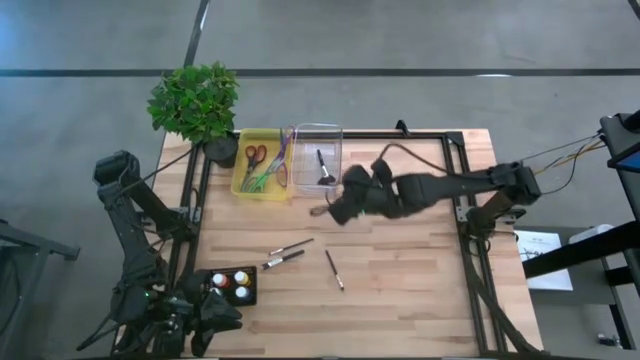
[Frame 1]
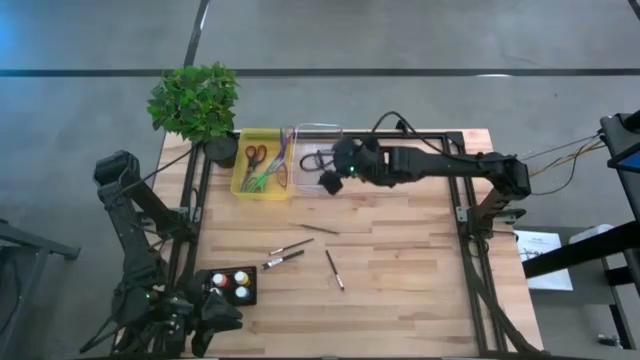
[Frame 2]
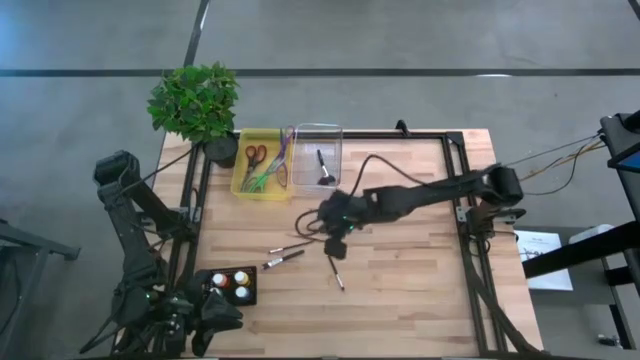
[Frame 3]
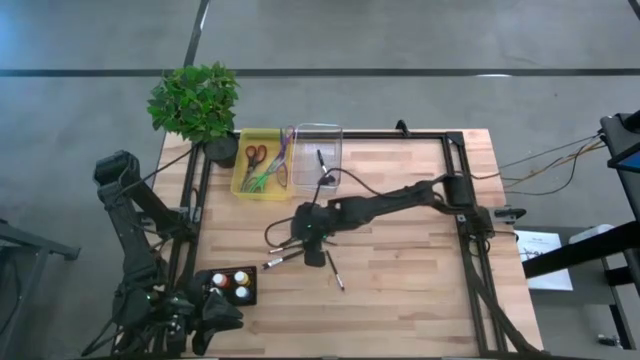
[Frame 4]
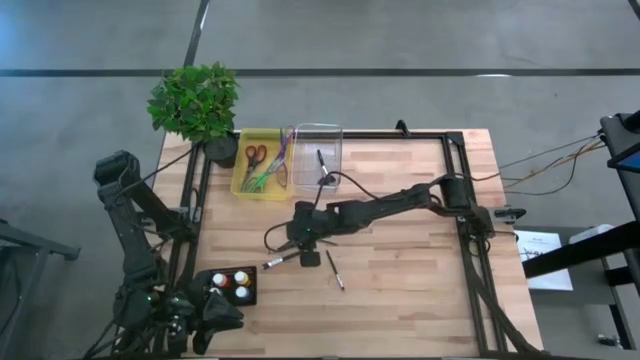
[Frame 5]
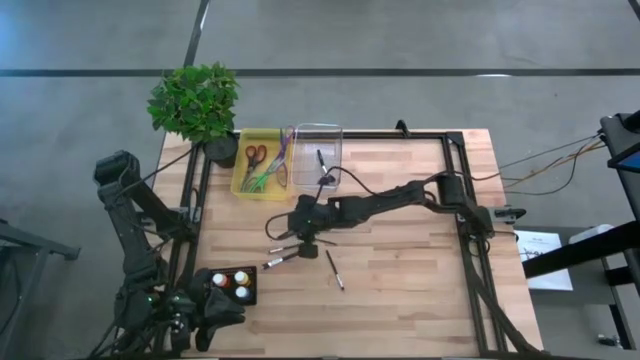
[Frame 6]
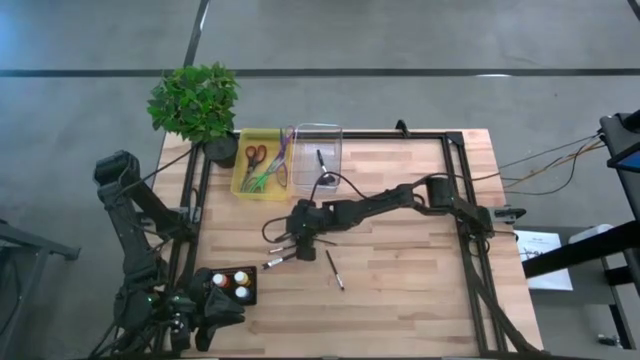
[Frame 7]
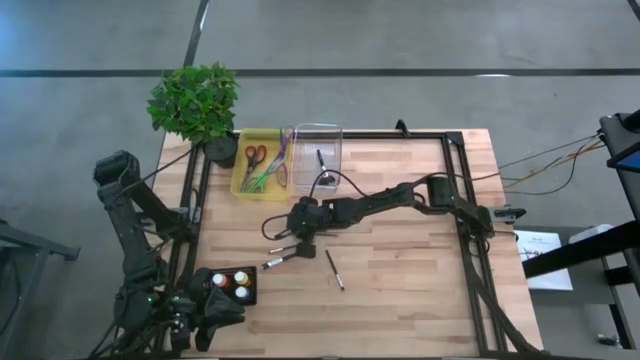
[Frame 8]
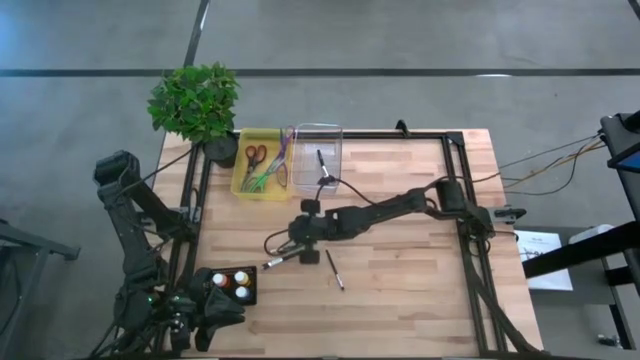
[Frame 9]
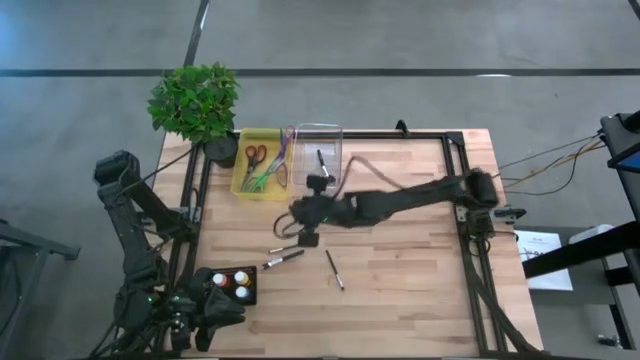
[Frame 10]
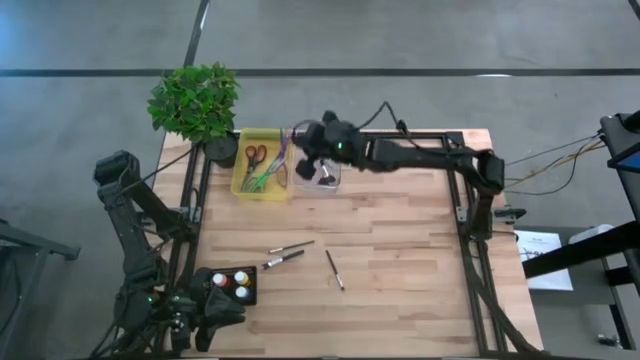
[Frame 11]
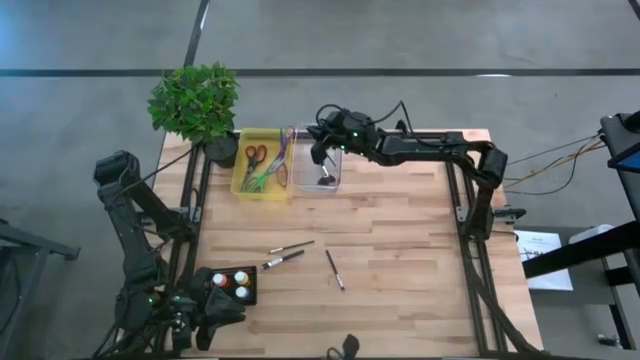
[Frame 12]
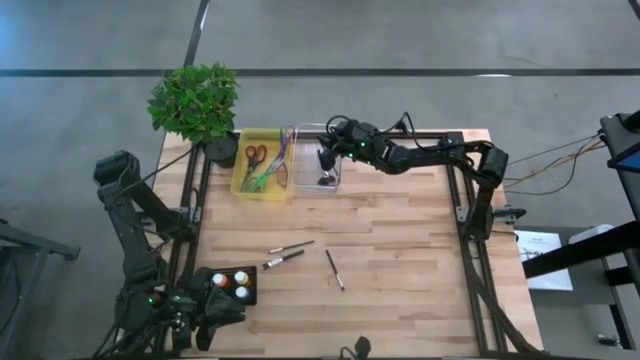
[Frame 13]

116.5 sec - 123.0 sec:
Task: Pick & Place Paint Supplies
Put the gold and black paintbrush into the transparent bin

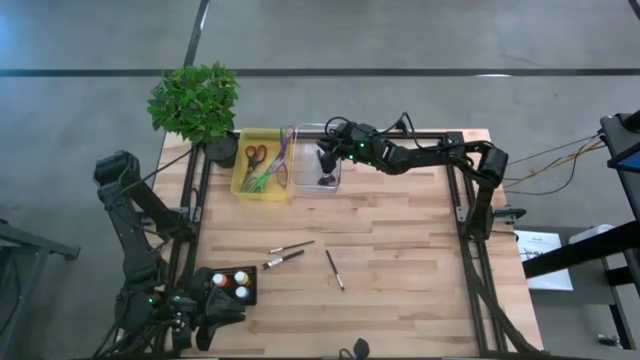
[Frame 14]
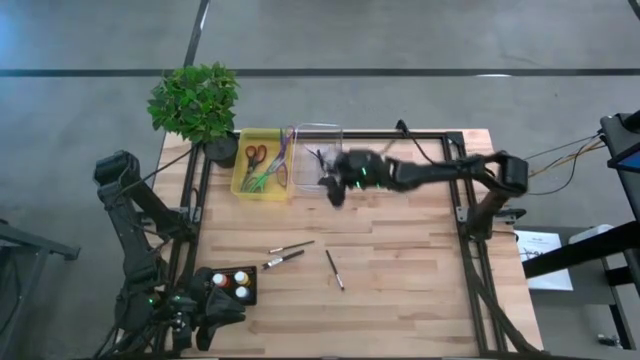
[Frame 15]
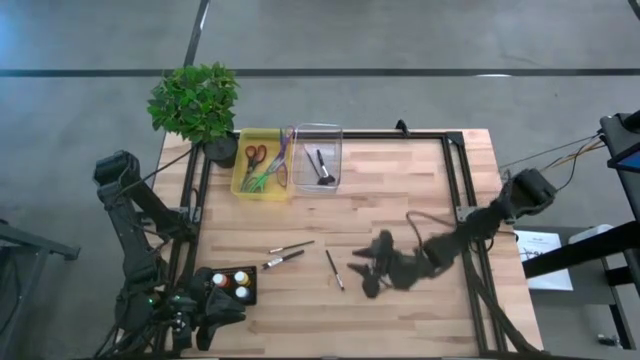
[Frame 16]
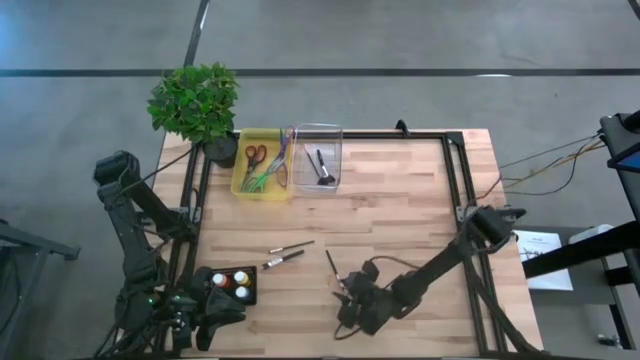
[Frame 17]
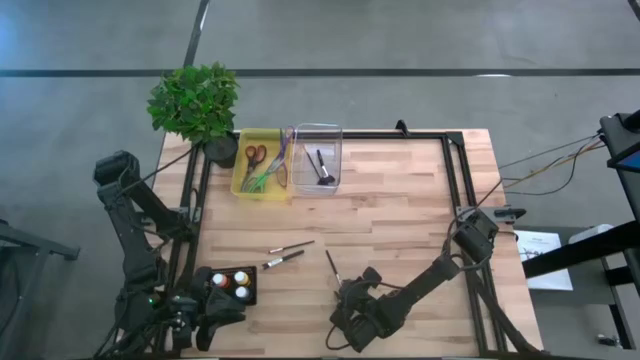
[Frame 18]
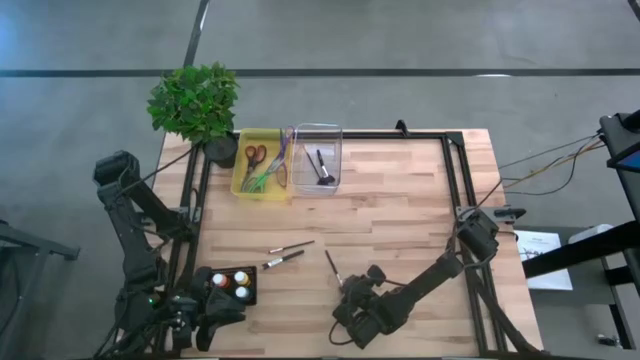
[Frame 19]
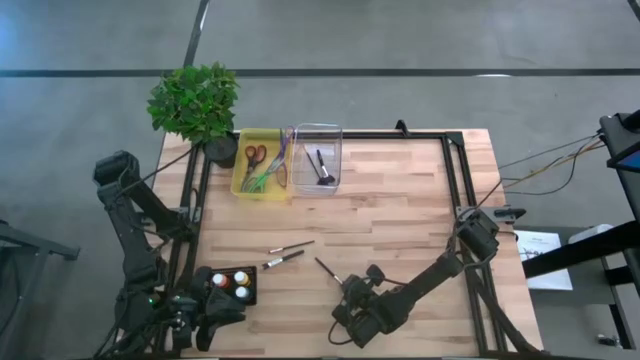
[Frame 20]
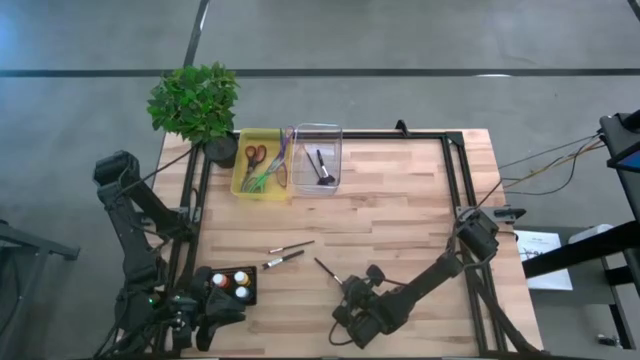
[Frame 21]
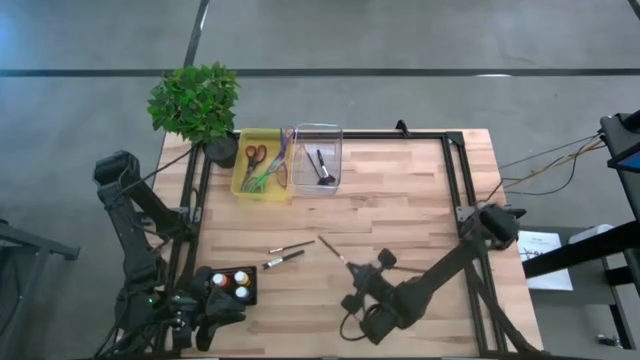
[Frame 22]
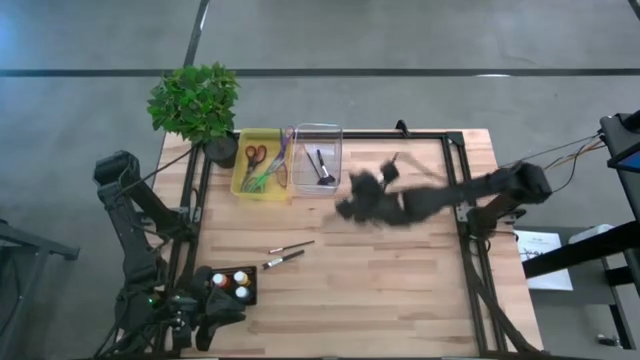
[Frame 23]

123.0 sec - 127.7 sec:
Put the silver and black paintbrush into the transparent bin

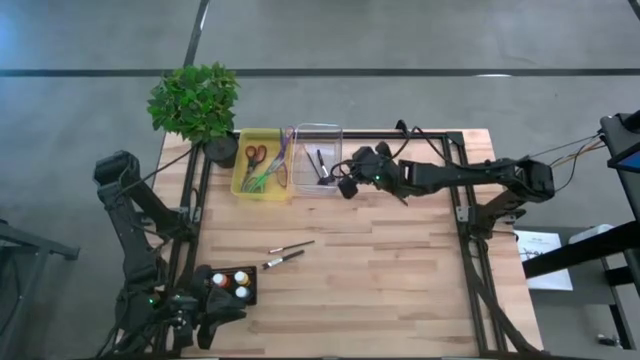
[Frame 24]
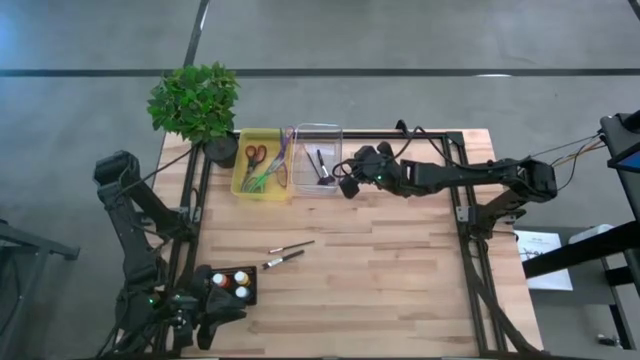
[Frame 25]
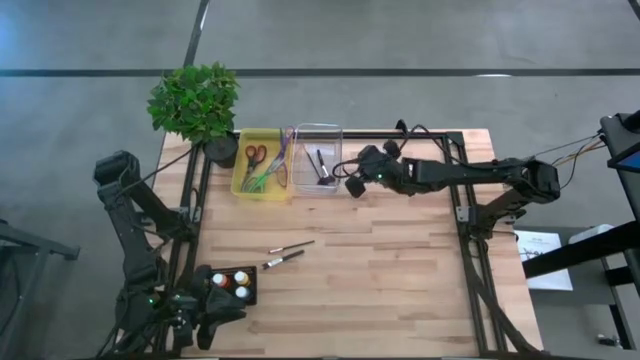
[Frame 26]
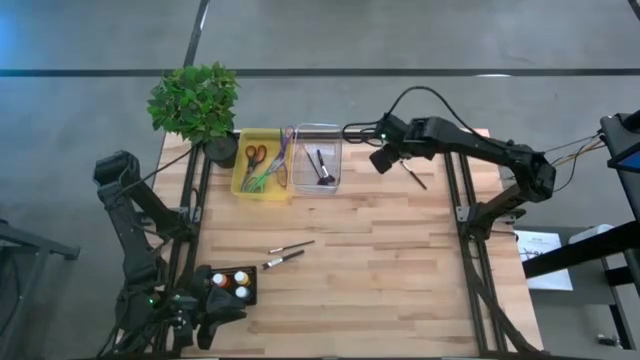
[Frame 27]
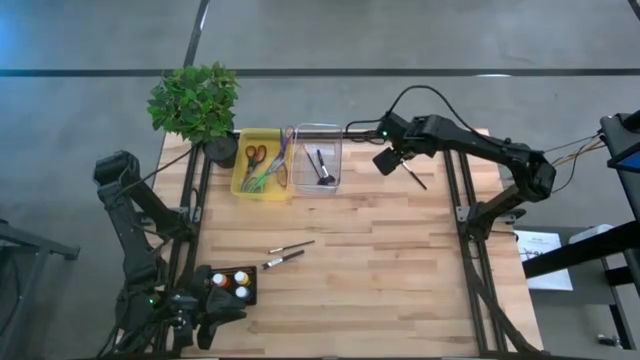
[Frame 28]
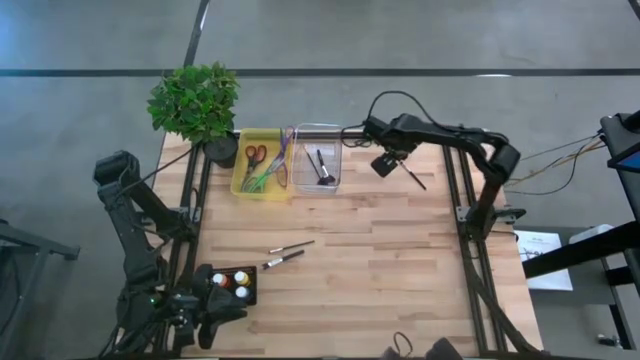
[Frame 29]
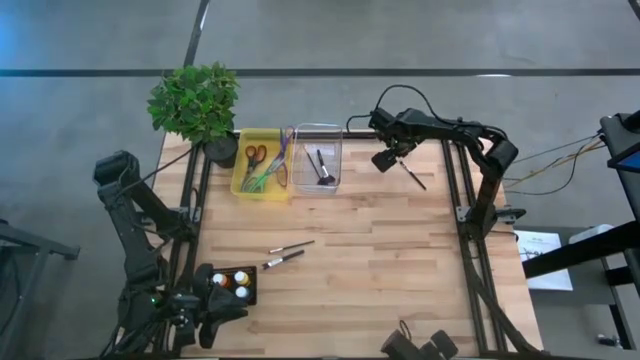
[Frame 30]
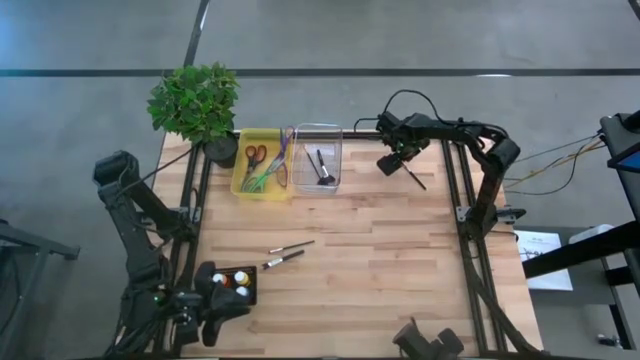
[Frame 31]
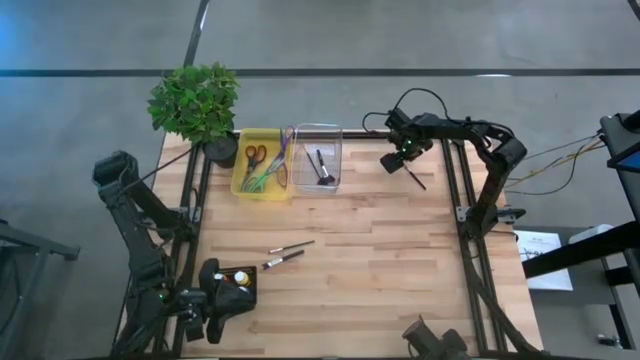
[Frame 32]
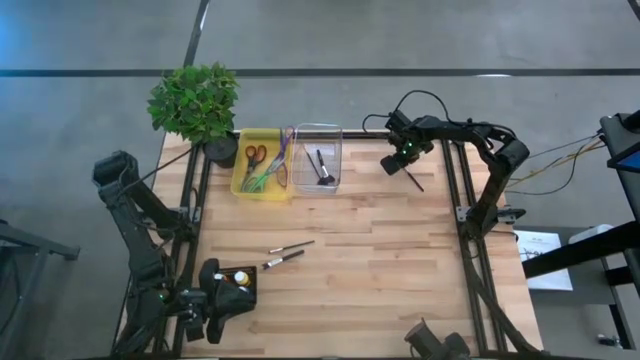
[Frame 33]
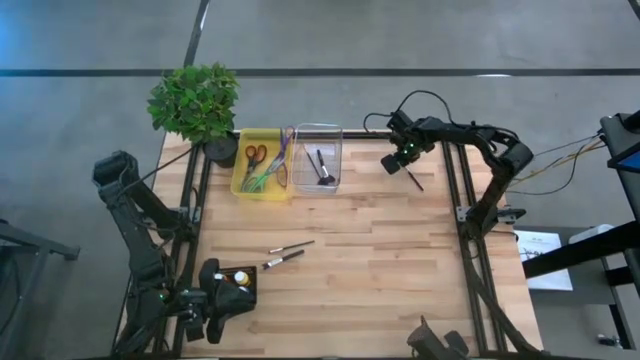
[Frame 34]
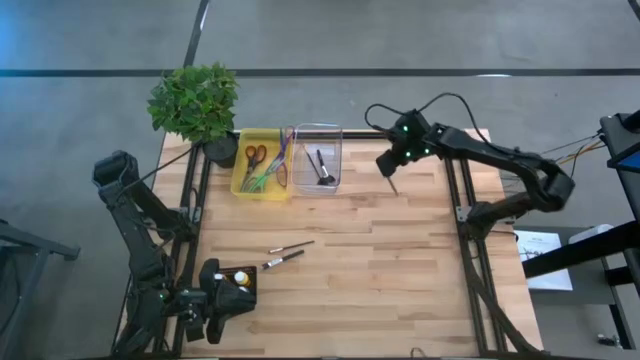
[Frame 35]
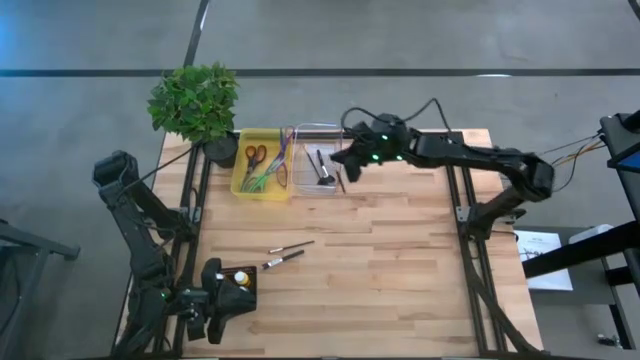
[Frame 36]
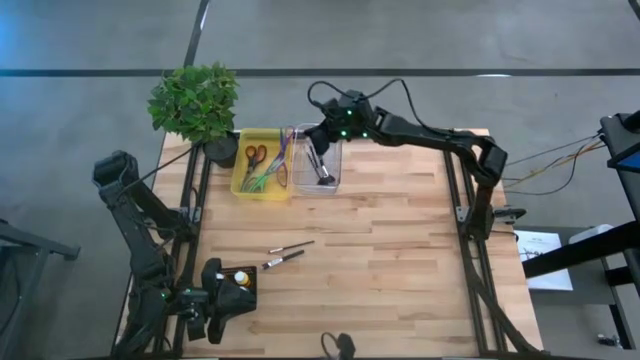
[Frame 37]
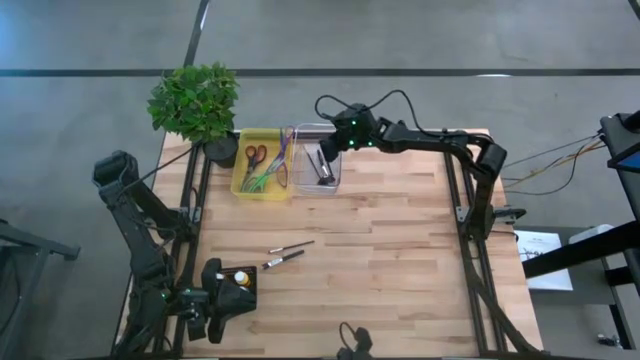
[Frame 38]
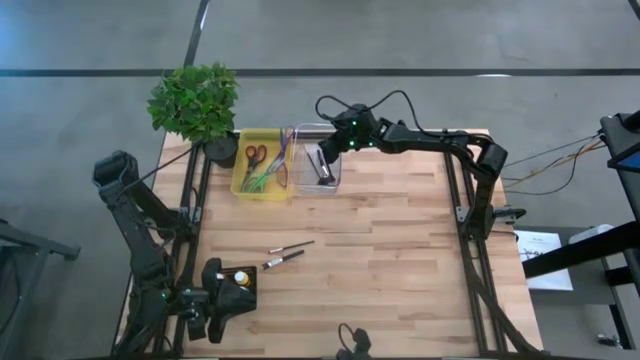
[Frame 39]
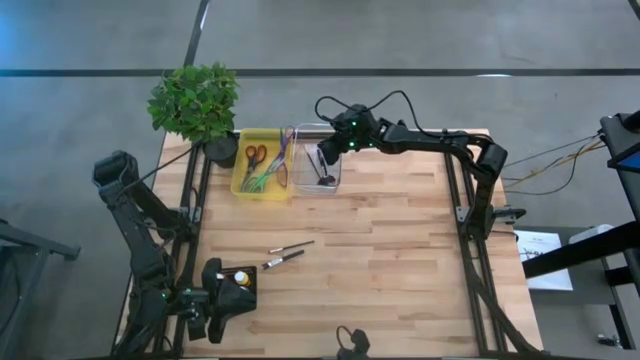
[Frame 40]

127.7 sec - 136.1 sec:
Put the silver and black paintbrush into the transparent bin
